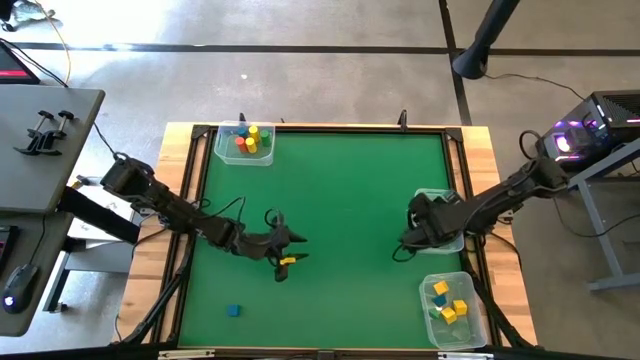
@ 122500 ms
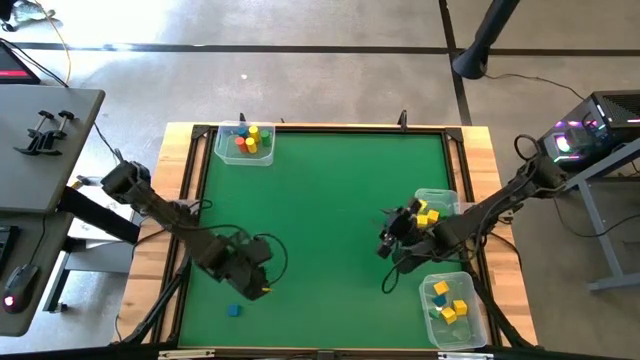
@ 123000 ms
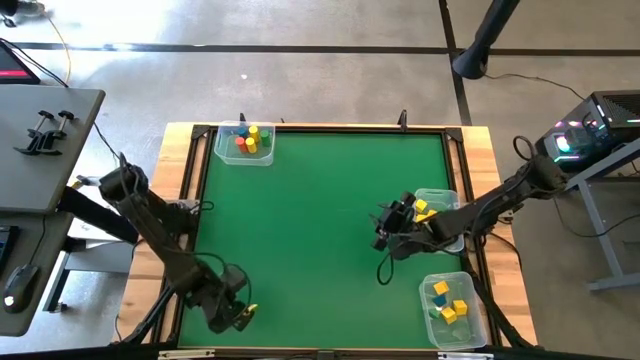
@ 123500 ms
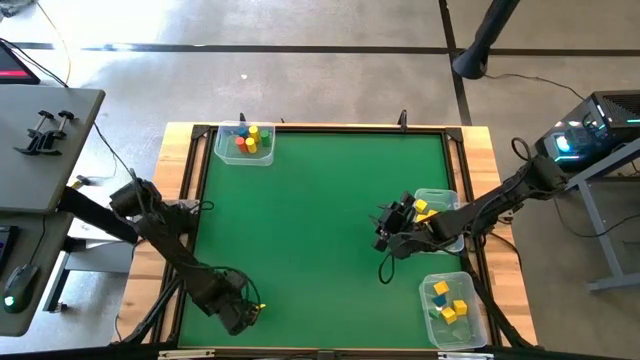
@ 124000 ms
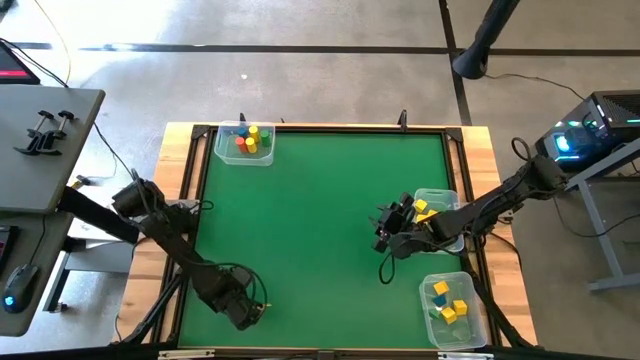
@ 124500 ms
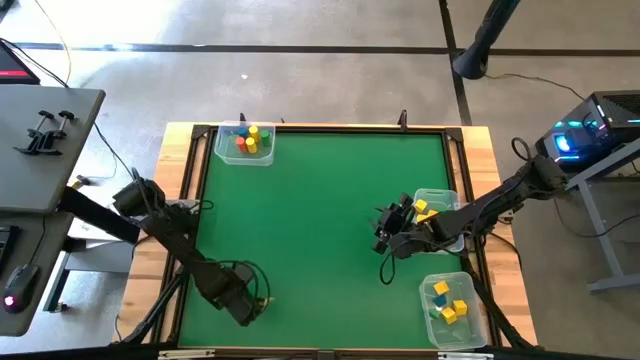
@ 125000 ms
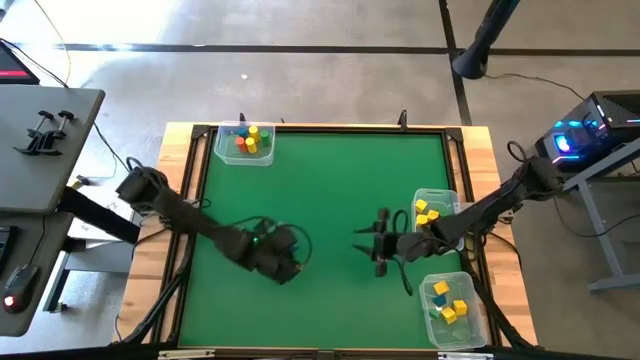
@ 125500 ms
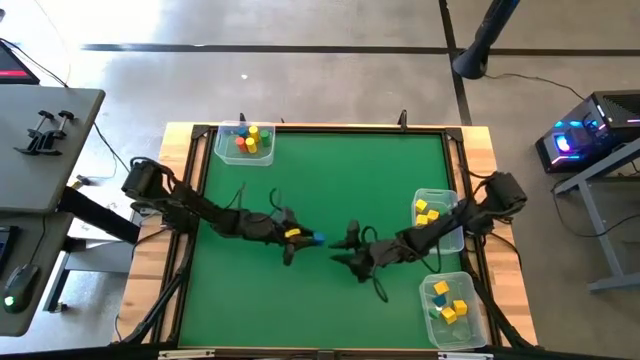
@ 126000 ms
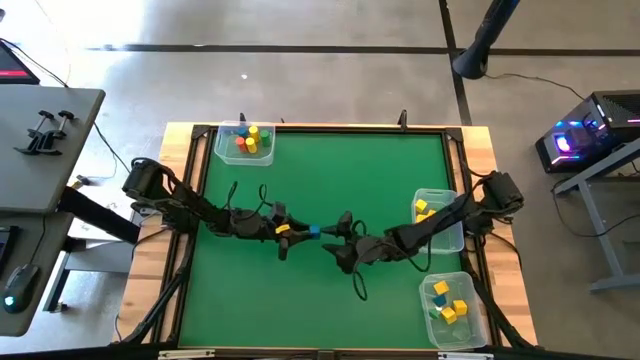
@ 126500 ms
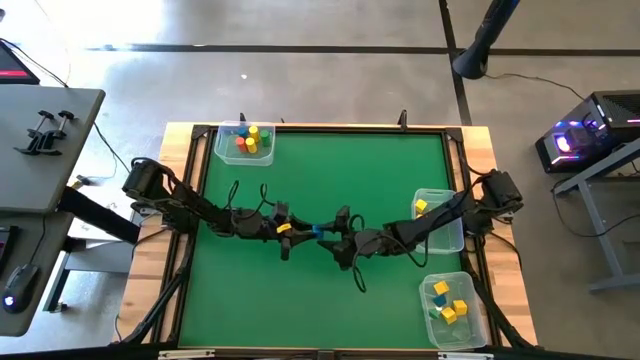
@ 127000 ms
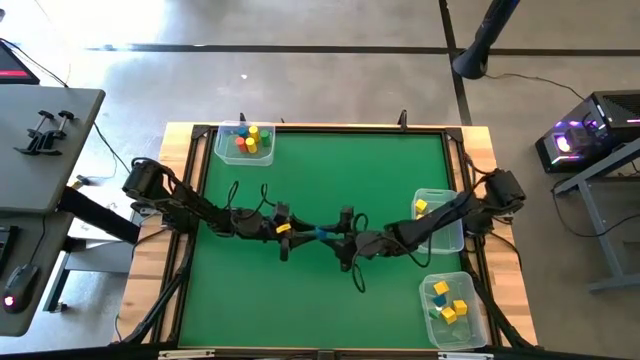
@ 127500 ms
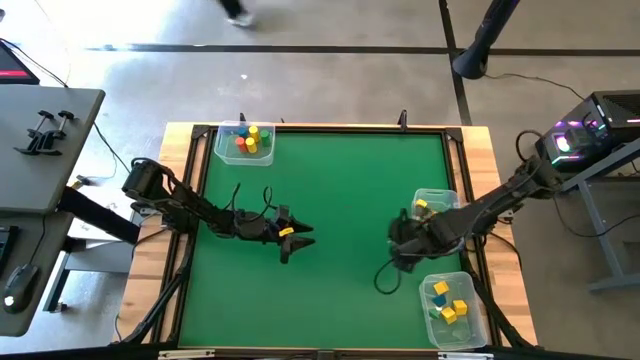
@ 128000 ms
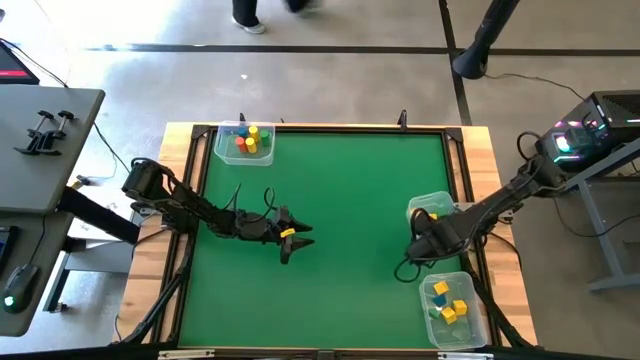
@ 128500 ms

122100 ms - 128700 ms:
Task: Sort blocks by size
Put the blue cube block into the middle transparent bin

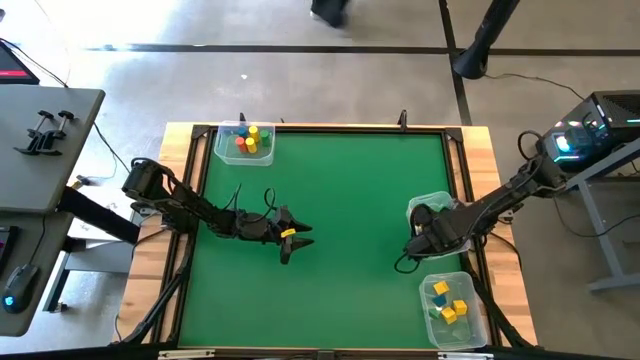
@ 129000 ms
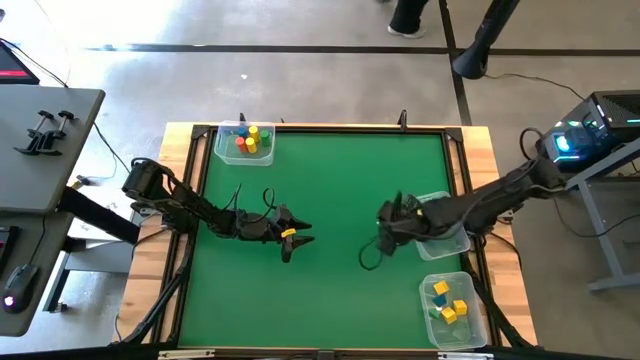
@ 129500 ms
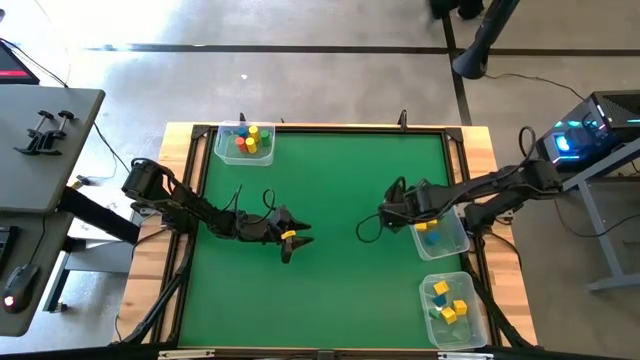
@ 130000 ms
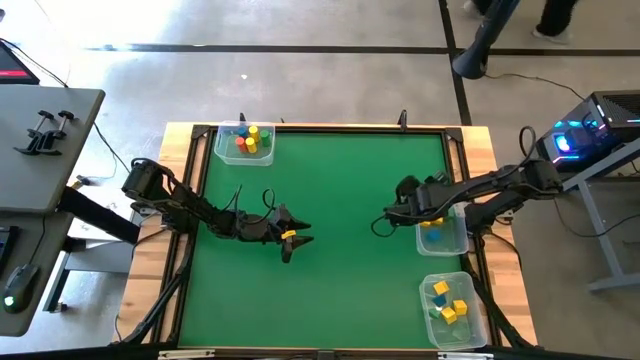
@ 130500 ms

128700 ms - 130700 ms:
Adjust the middle transparent bin

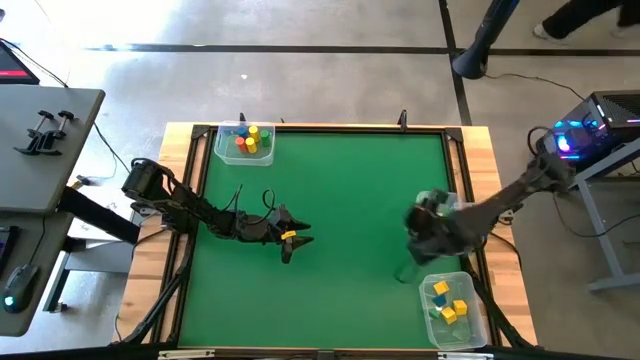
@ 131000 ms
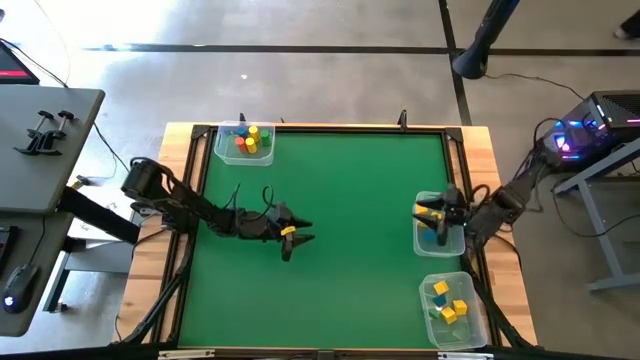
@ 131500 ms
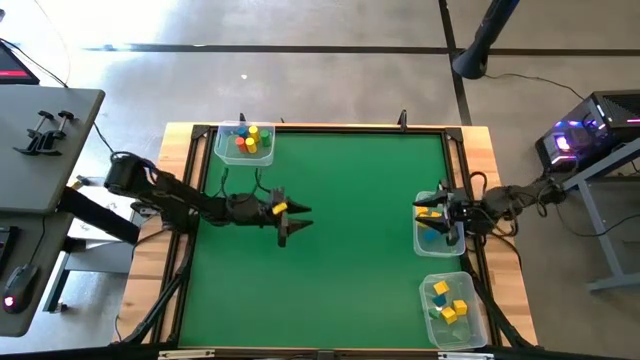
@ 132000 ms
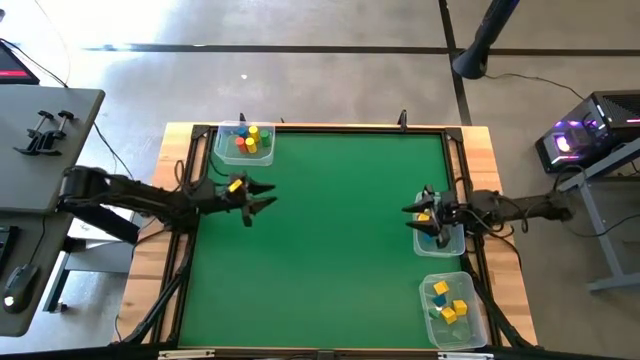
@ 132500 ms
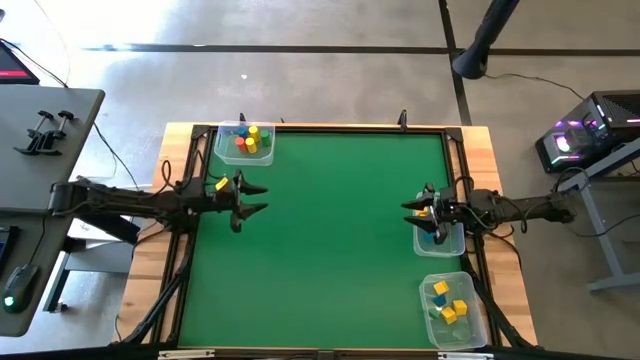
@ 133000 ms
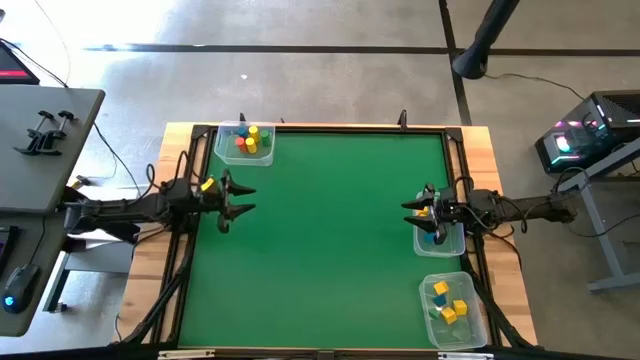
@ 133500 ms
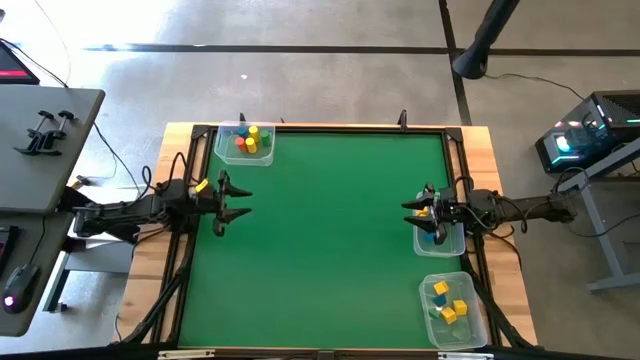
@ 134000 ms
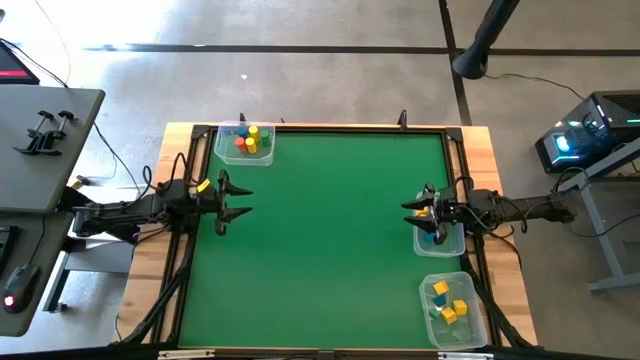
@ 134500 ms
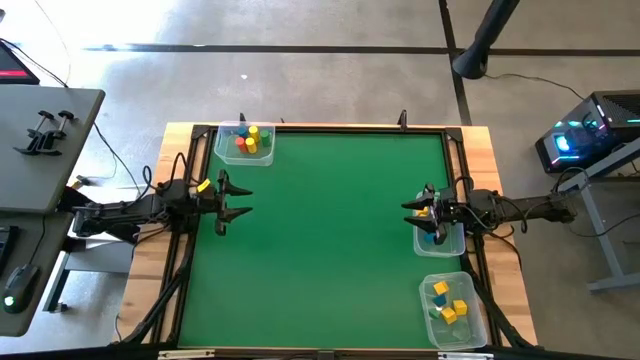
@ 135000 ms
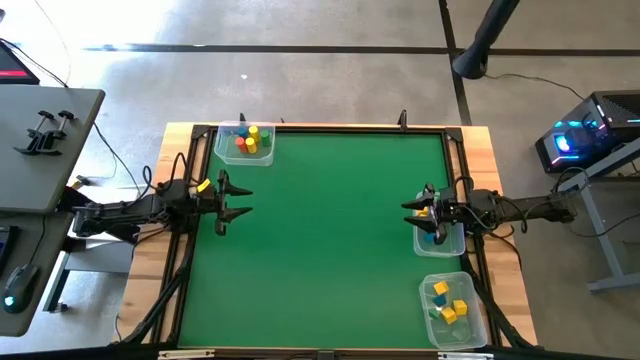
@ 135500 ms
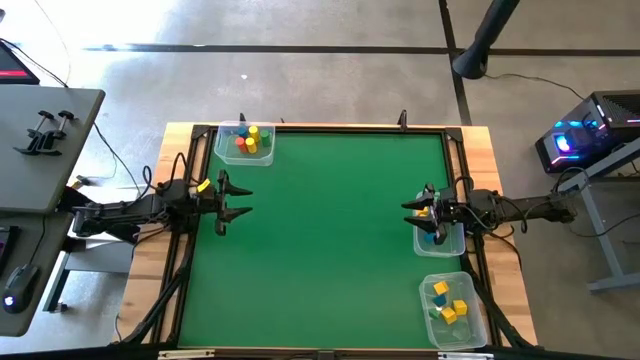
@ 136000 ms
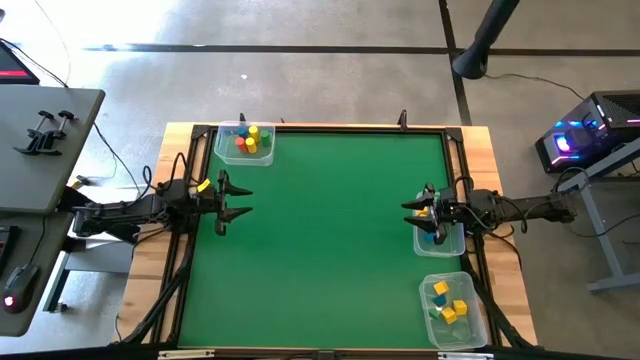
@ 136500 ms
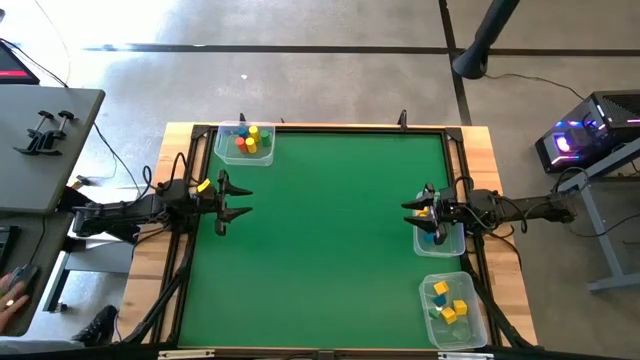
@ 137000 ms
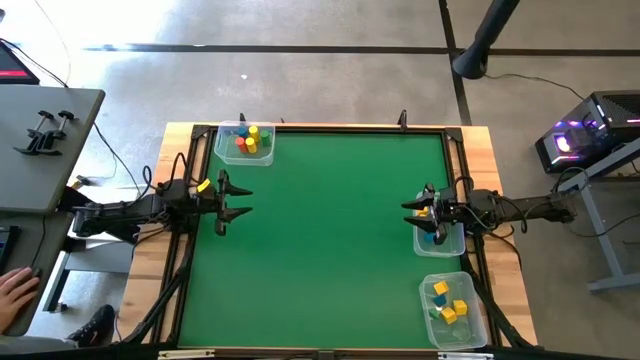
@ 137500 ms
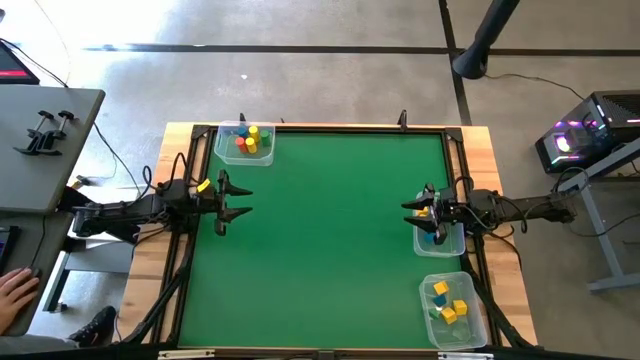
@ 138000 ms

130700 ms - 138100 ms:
Return to Home Position

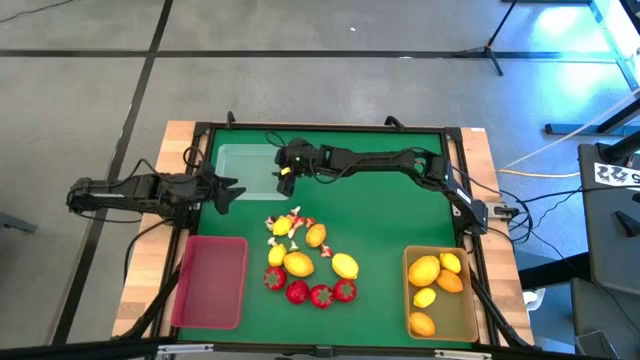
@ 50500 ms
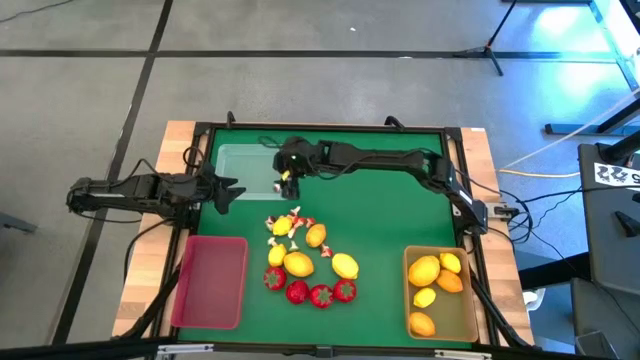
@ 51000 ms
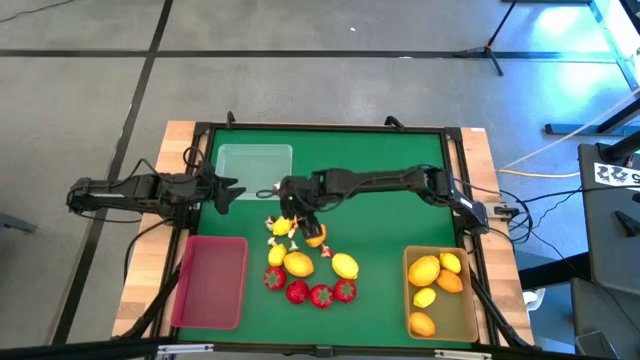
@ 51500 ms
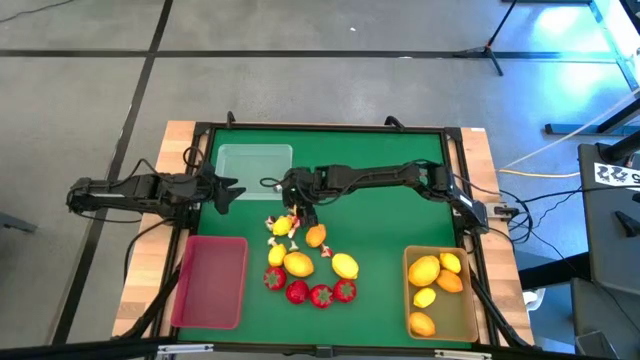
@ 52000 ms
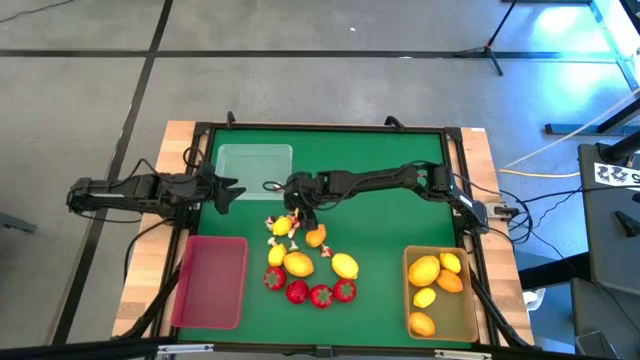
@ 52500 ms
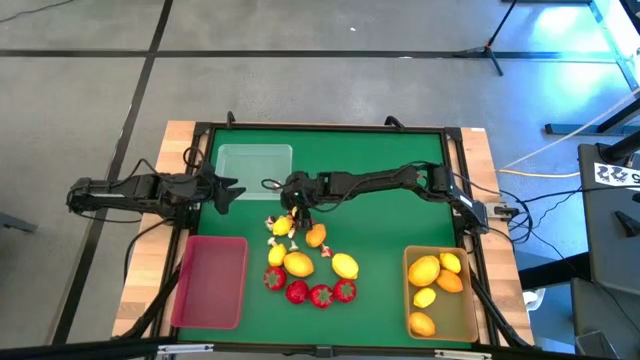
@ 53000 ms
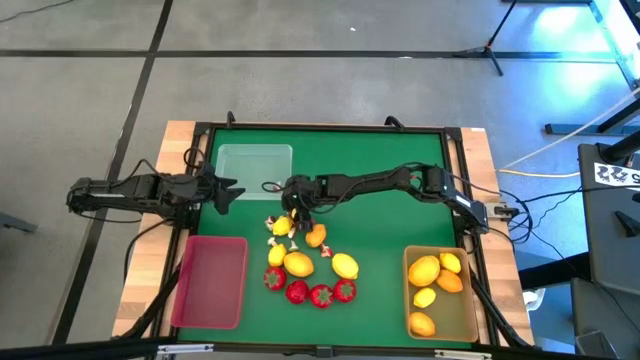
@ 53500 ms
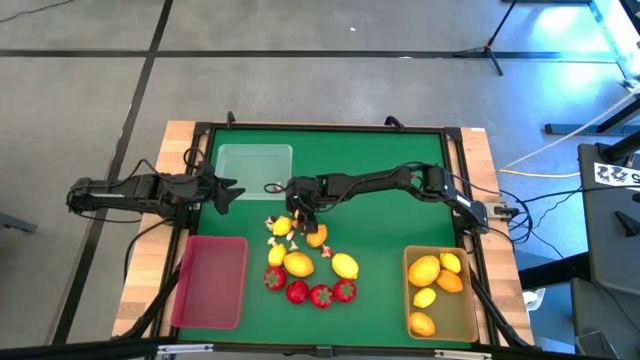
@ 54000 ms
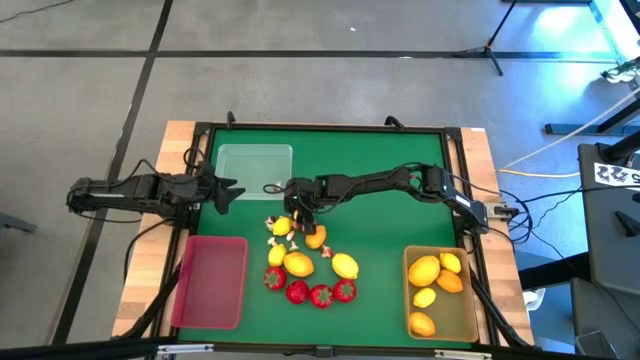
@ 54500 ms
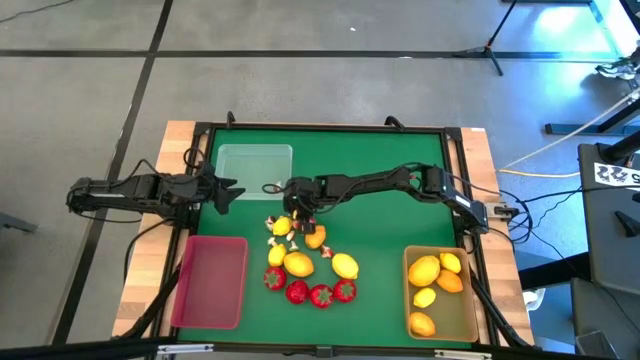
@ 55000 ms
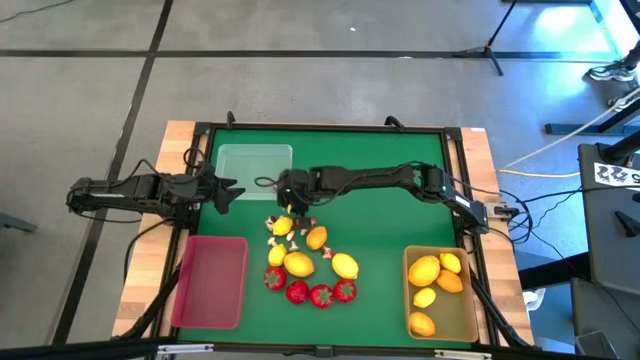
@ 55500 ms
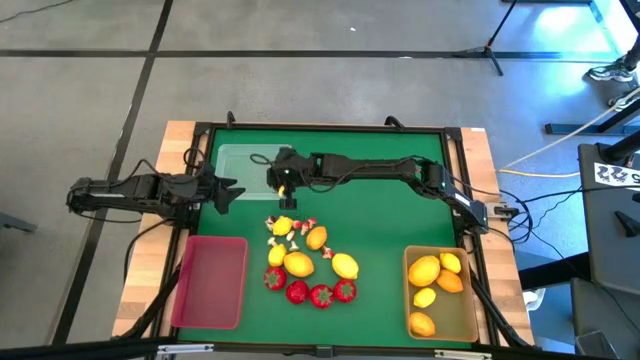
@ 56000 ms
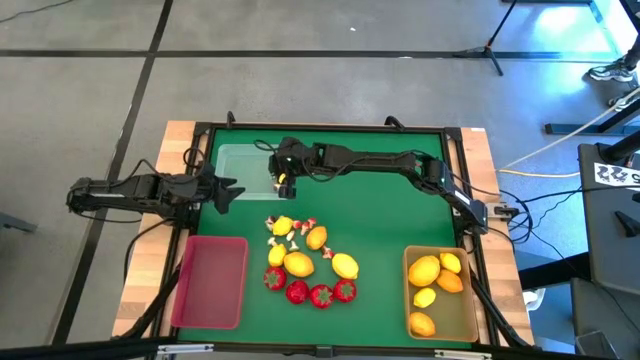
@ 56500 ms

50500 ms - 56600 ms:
Task: Sort produce into baskets
Put the brown mushroom into the transparent bin
